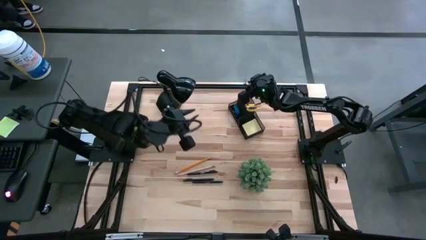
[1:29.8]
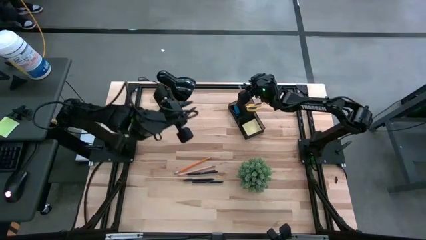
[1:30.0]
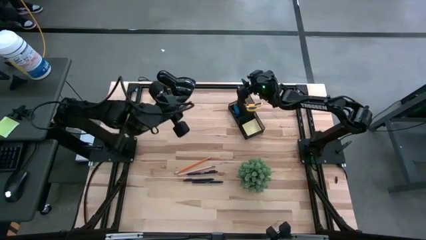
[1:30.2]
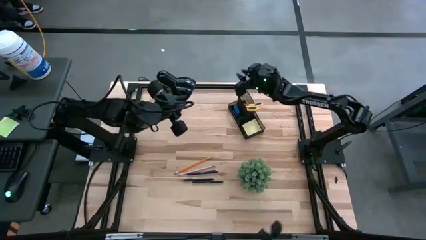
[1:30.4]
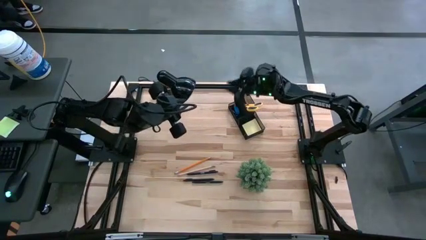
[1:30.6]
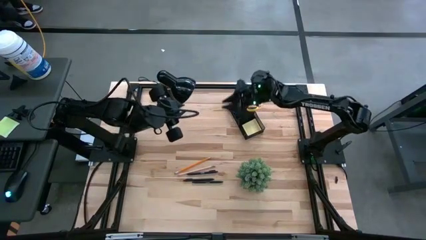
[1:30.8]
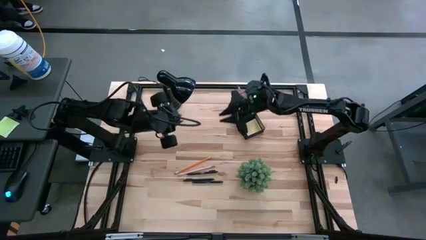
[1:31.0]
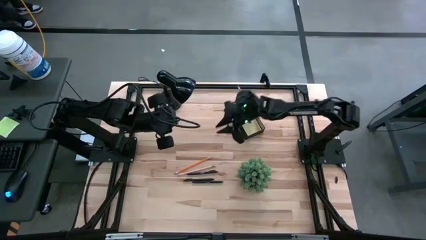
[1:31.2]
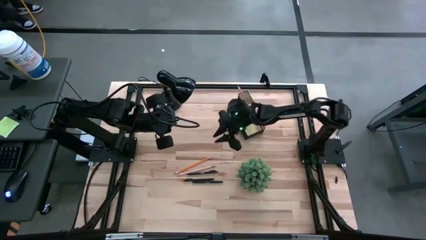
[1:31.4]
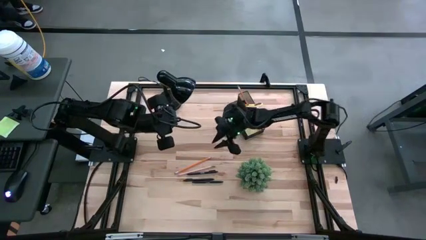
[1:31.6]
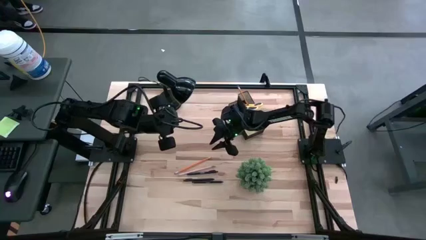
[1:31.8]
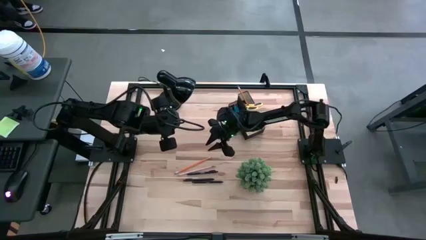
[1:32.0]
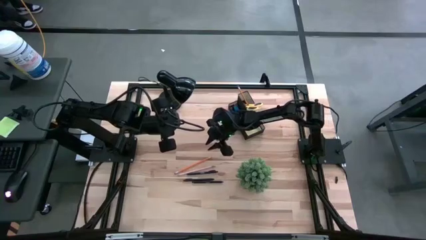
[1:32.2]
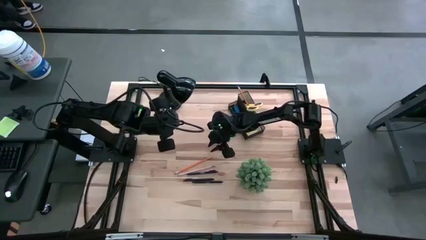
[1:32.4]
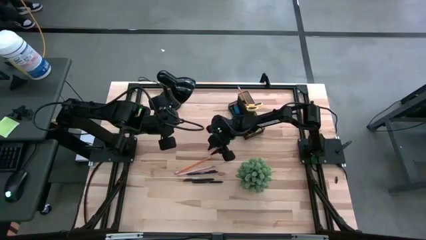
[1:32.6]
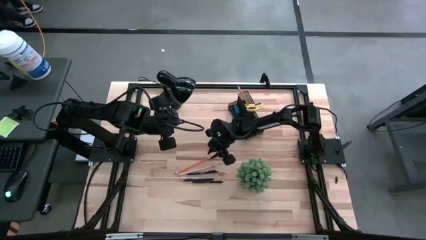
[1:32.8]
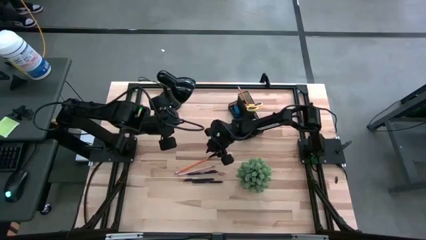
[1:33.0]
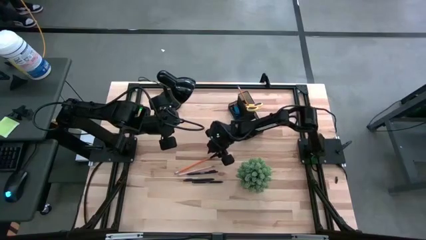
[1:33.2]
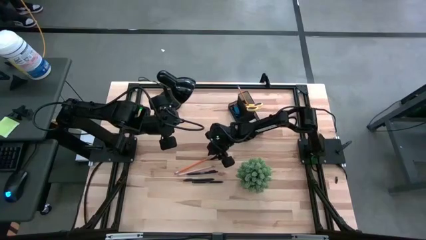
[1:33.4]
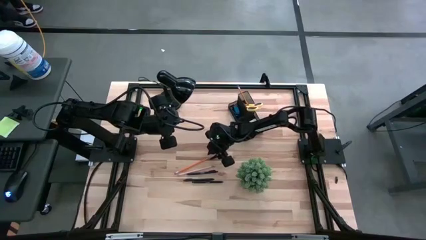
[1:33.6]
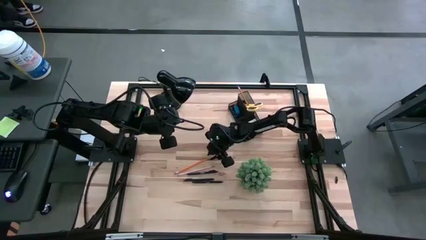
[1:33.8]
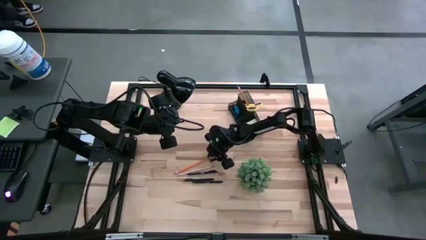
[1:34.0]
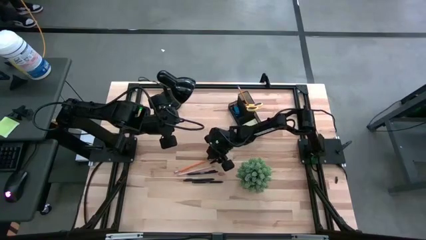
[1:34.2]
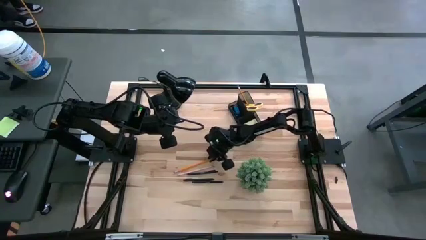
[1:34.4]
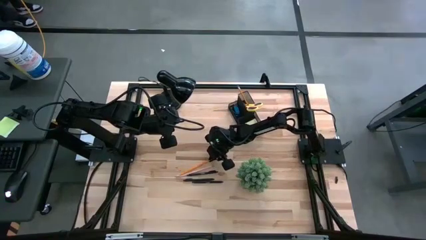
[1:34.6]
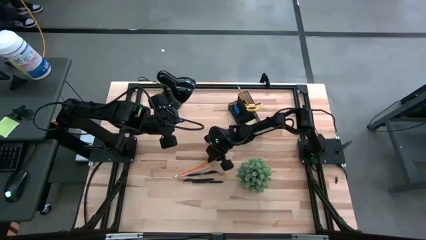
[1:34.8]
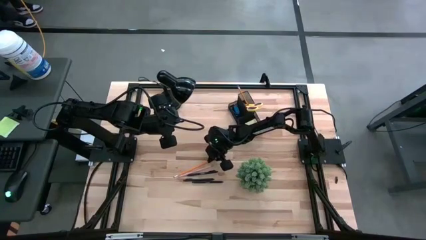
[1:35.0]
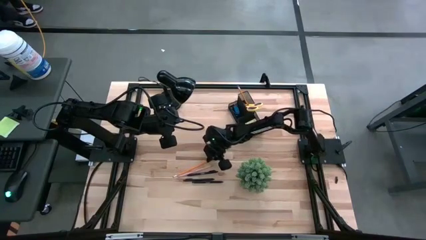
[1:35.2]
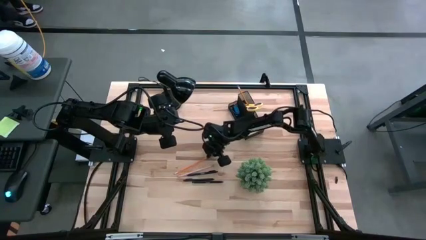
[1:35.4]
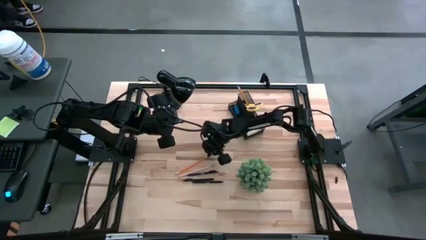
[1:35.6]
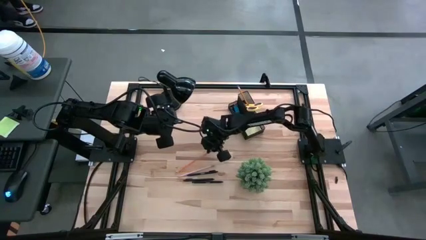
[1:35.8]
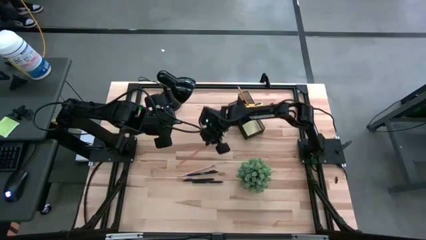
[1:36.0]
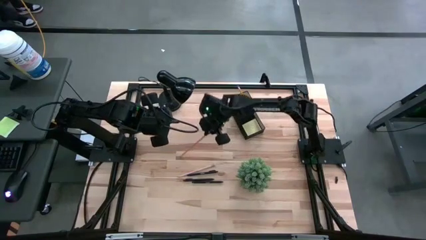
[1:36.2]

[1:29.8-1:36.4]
Task: Pick and place office supplies into organizer
Put the orange pencil into the desk organizer

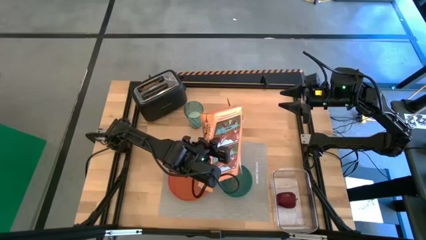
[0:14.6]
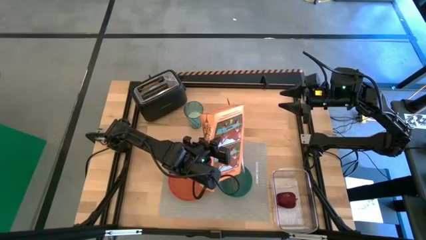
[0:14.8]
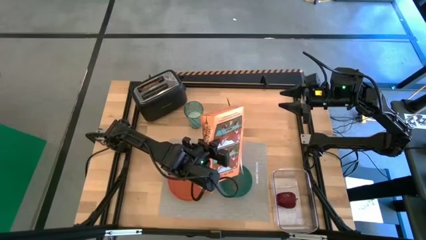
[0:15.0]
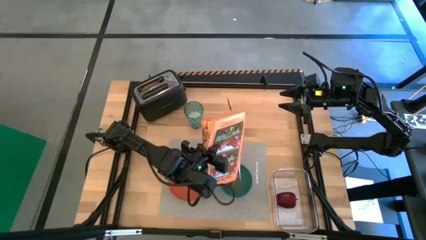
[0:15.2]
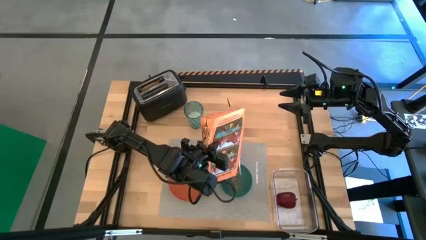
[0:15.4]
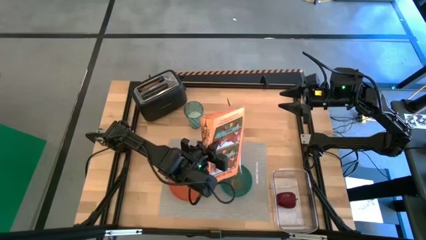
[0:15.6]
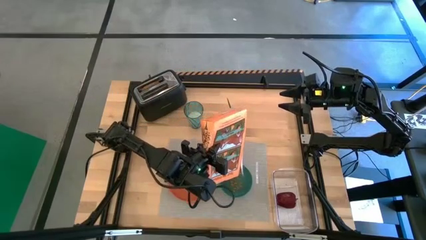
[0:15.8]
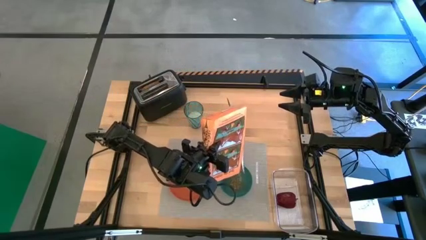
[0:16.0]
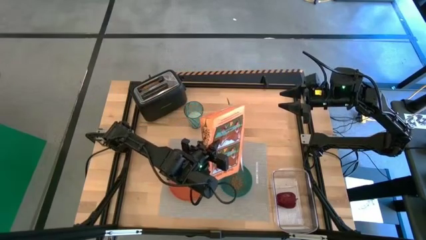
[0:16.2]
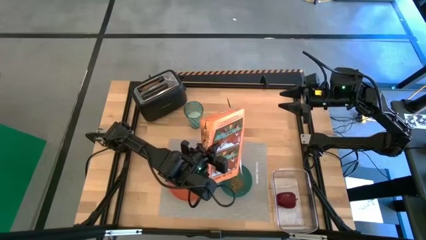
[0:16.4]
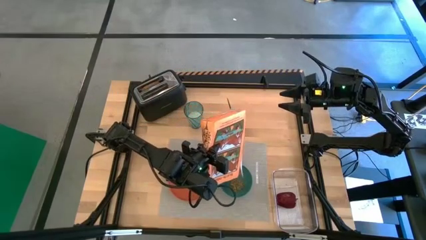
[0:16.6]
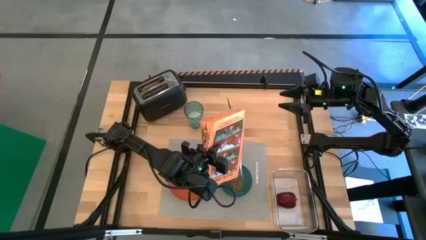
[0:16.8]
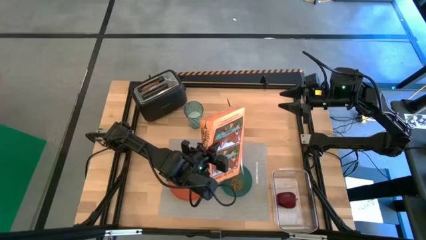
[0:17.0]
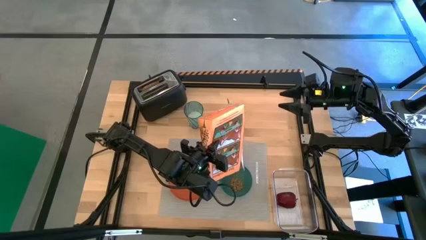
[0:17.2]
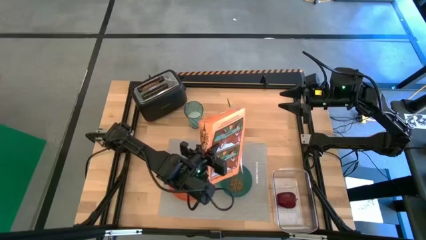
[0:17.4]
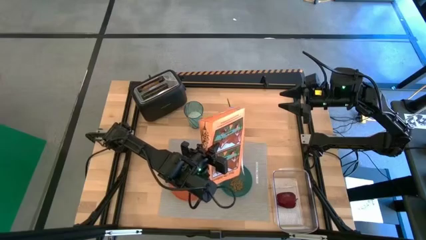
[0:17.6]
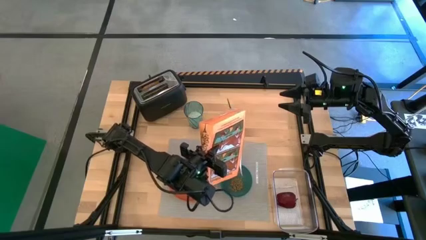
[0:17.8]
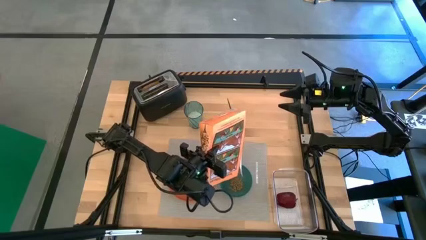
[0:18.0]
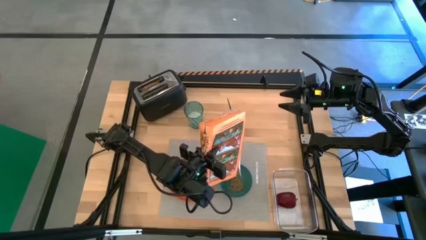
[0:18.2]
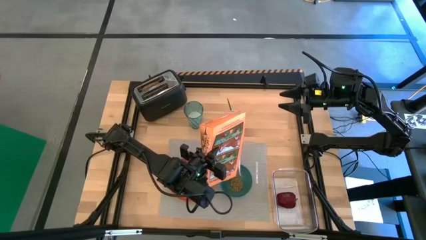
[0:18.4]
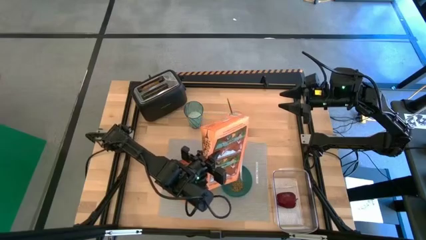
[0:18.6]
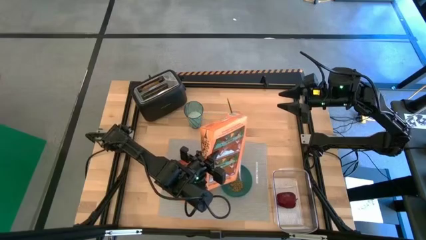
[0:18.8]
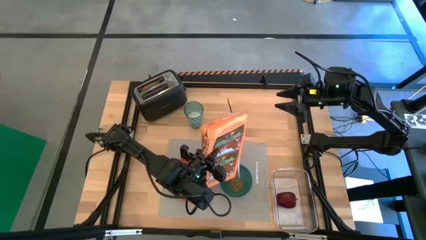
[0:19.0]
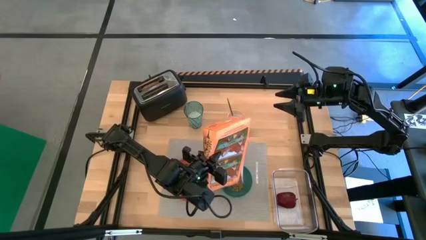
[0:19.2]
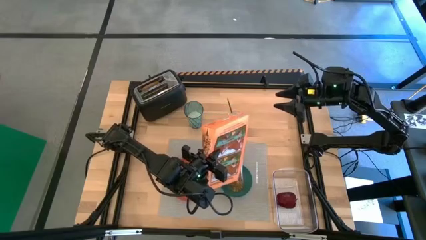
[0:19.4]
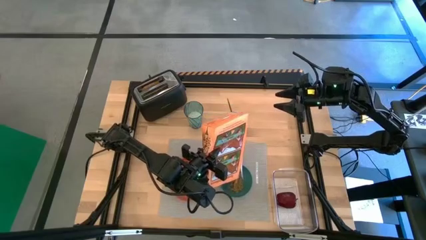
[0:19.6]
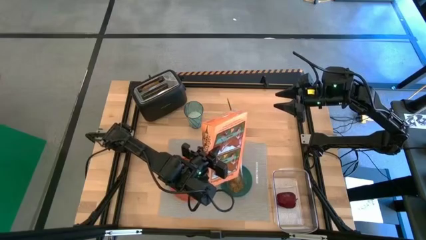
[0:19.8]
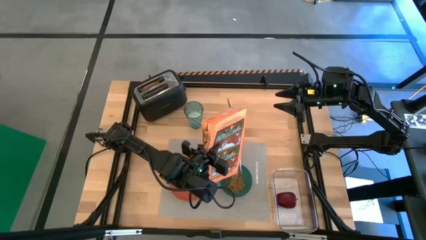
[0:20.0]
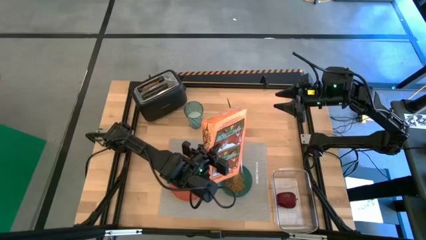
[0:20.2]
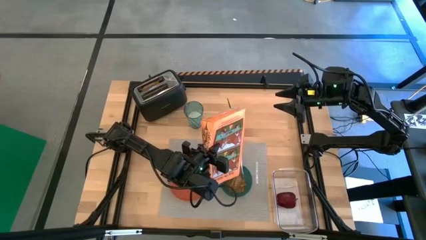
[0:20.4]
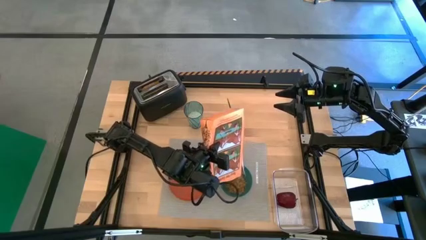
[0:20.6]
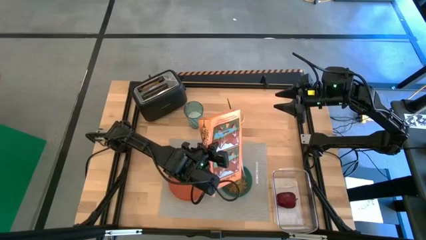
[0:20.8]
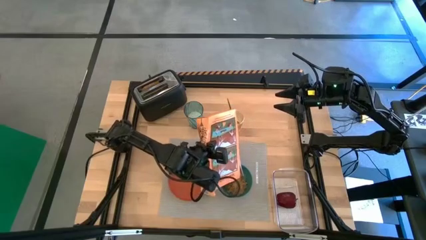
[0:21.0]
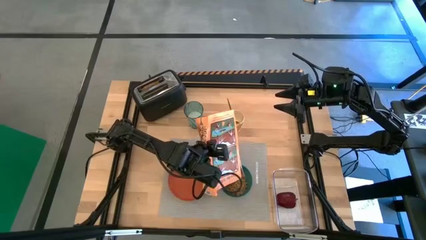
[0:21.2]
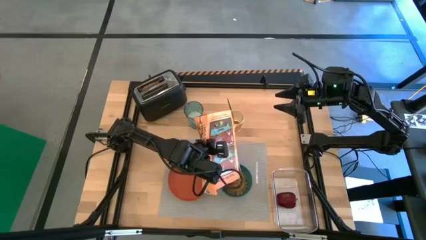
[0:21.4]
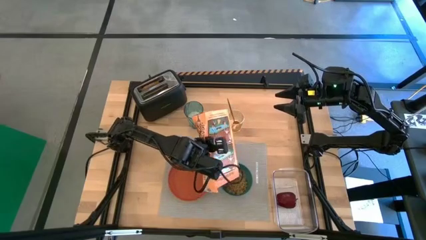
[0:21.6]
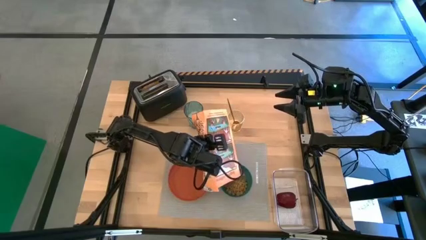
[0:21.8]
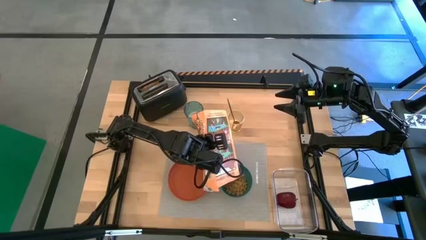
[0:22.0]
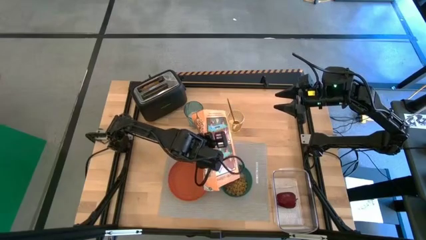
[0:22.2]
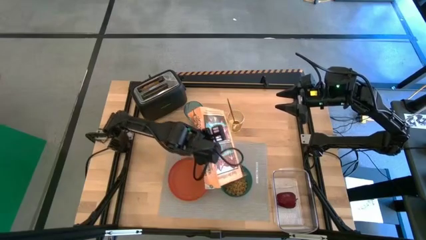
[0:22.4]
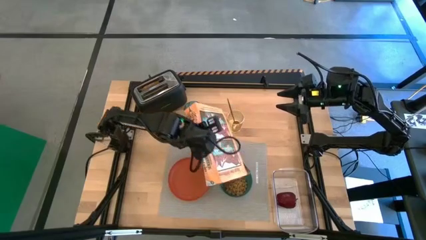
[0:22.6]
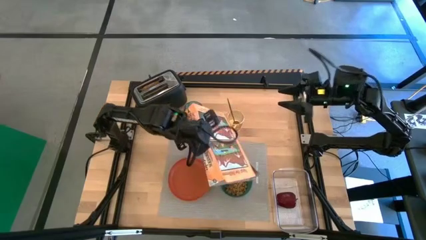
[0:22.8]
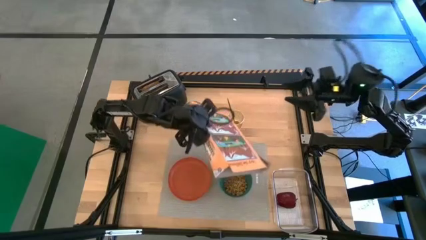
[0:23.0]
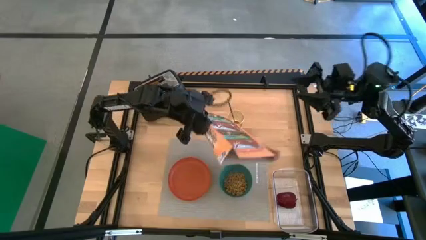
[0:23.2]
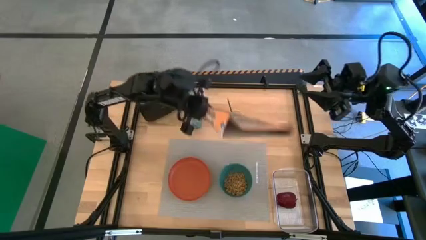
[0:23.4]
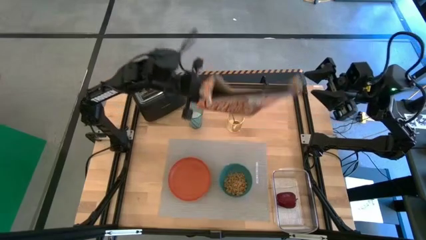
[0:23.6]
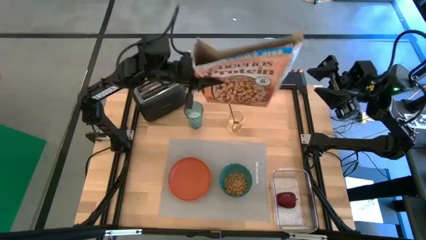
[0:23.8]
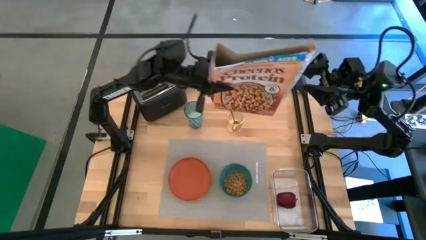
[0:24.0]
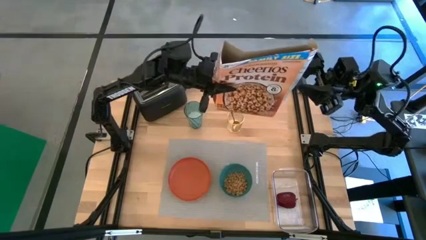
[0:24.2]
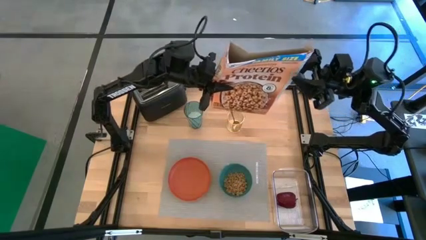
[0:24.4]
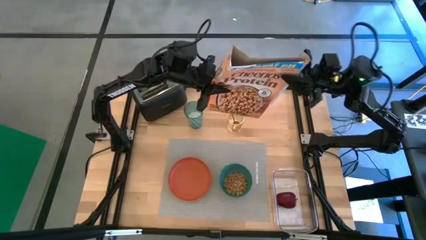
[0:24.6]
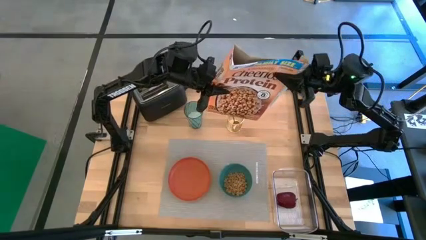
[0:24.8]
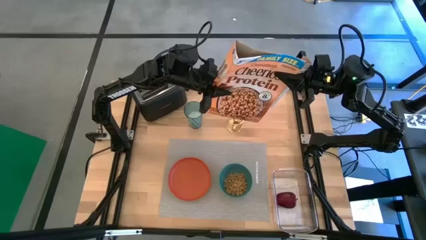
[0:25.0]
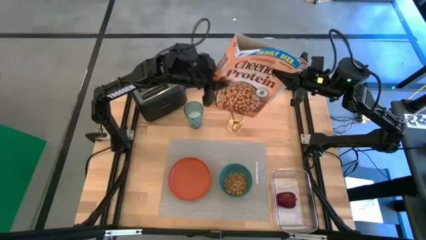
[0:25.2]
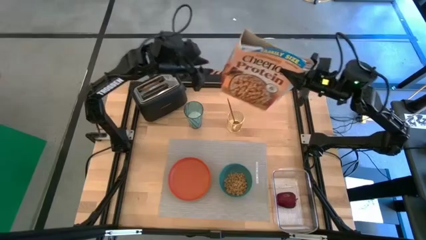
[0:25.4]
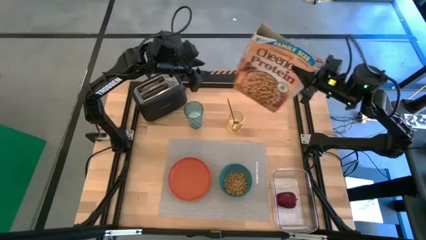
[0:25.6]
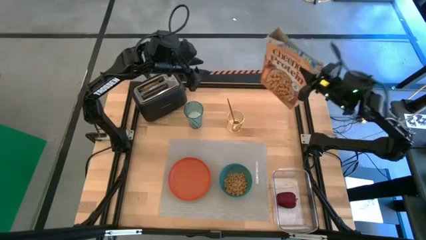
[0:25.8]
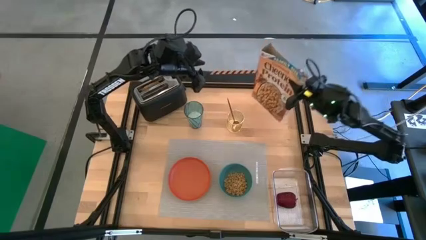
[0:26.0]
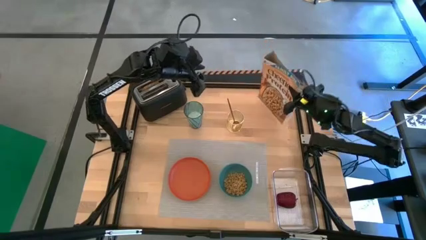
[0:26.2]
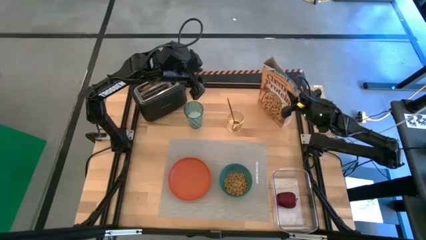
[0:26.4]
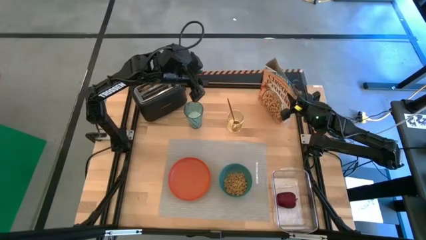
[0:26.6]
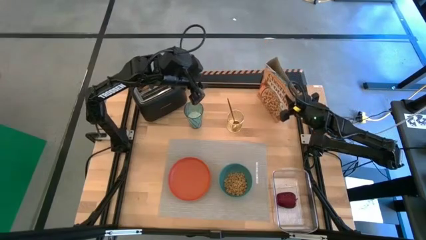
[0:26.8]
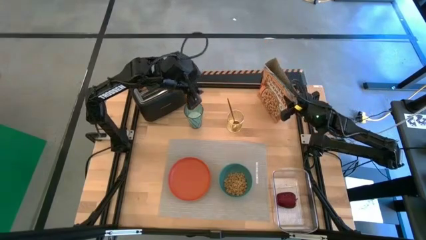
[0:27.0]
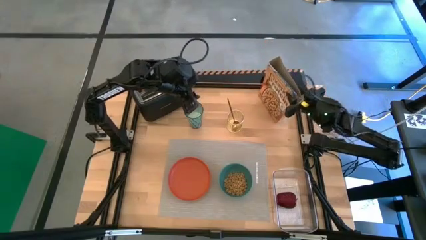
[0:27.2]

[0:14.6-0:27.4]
Task: Arrange a breakfast setting
Pour the yellow cereal in the green bowl
